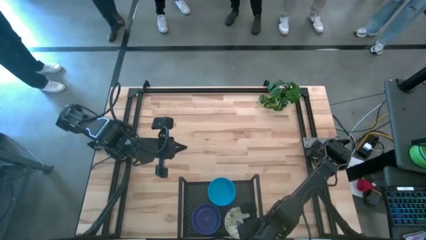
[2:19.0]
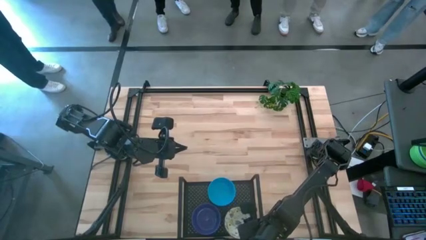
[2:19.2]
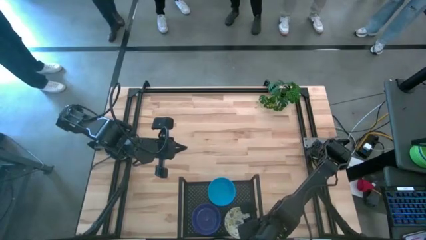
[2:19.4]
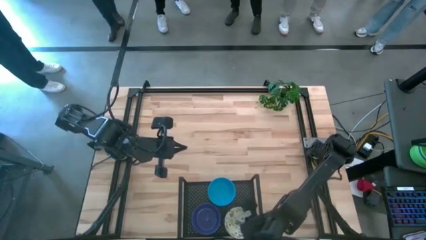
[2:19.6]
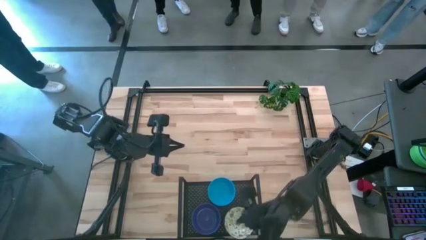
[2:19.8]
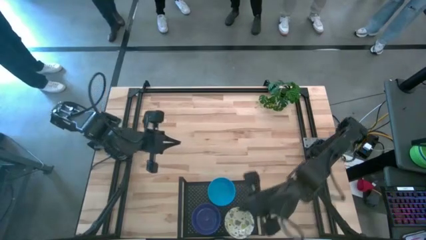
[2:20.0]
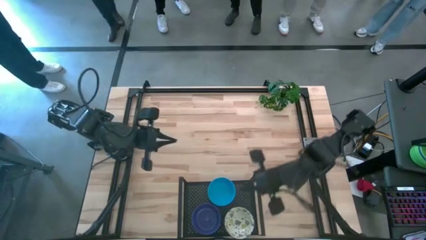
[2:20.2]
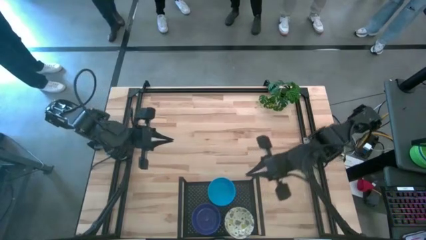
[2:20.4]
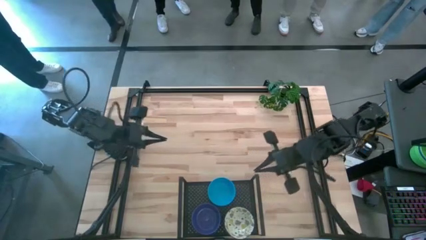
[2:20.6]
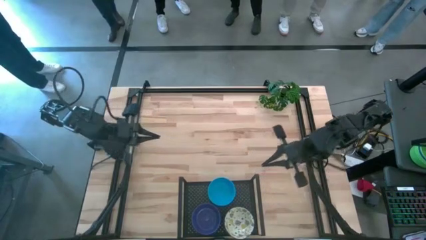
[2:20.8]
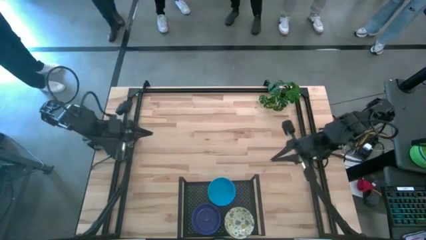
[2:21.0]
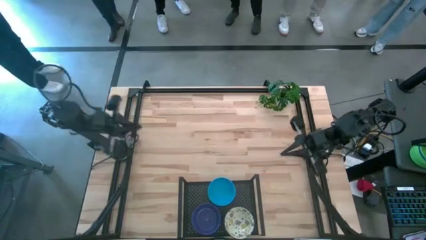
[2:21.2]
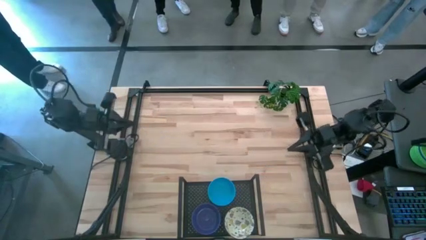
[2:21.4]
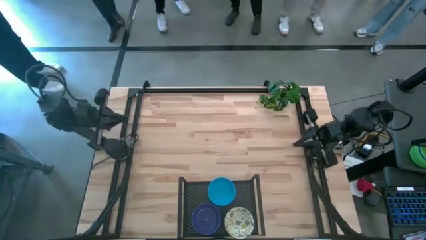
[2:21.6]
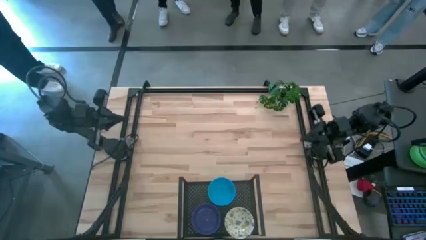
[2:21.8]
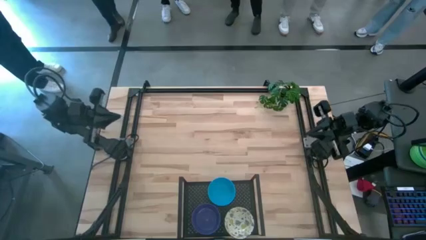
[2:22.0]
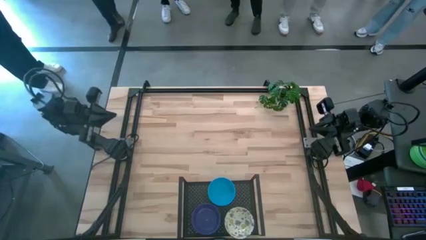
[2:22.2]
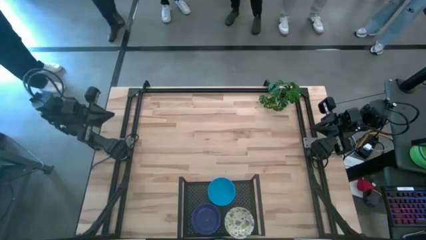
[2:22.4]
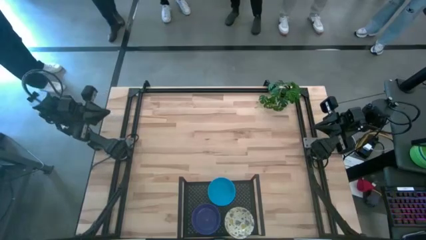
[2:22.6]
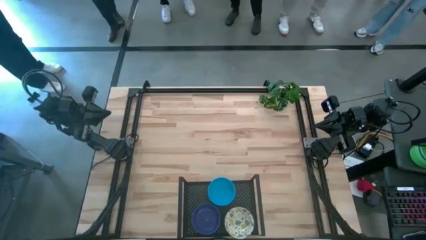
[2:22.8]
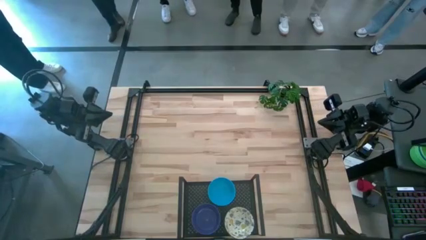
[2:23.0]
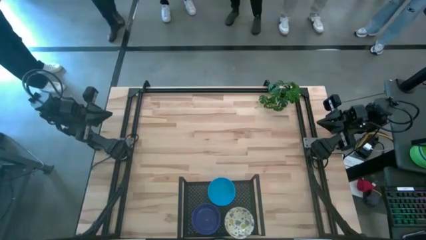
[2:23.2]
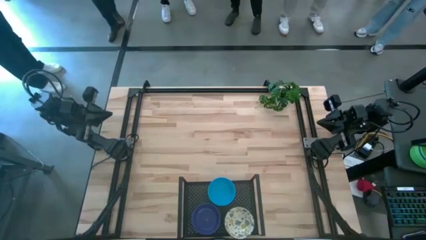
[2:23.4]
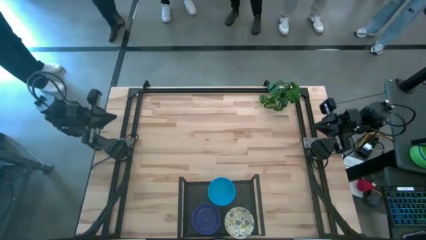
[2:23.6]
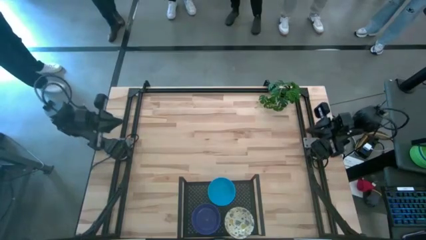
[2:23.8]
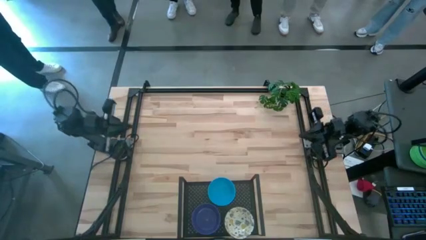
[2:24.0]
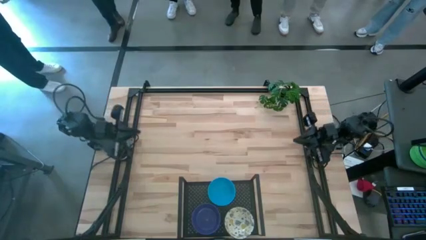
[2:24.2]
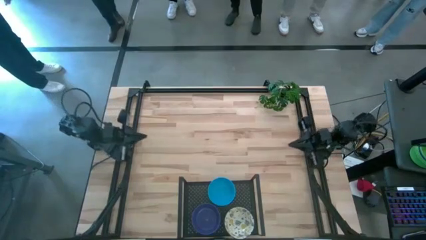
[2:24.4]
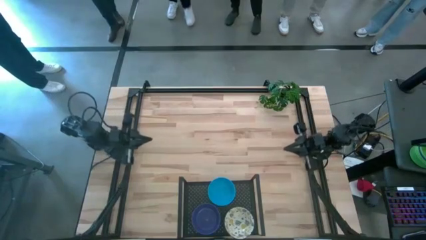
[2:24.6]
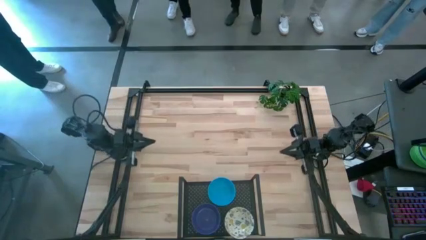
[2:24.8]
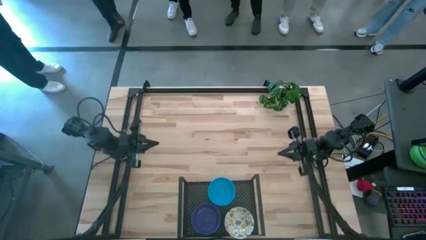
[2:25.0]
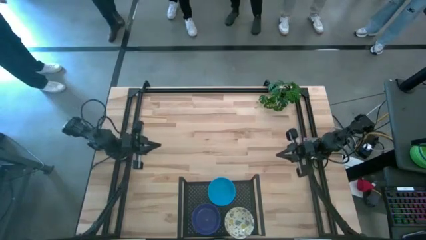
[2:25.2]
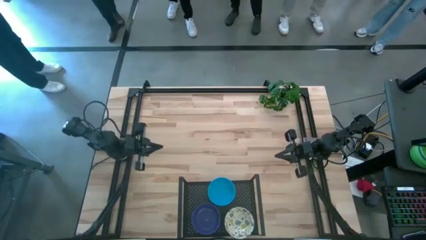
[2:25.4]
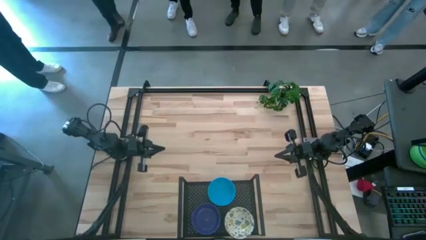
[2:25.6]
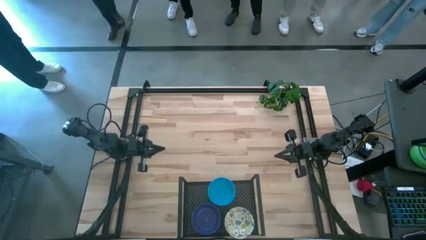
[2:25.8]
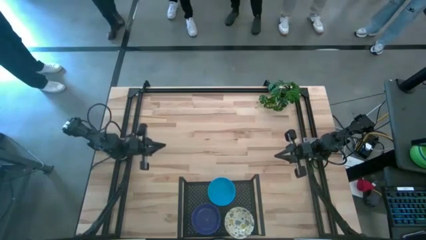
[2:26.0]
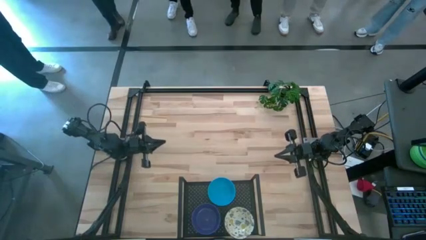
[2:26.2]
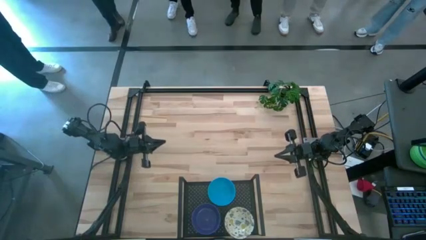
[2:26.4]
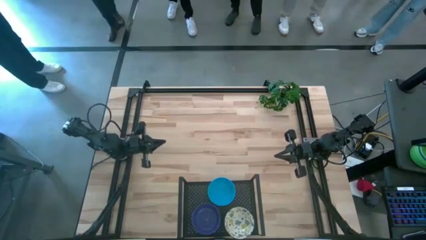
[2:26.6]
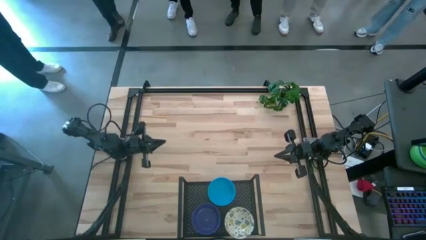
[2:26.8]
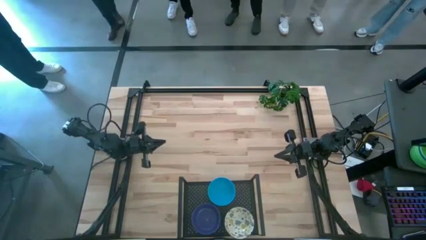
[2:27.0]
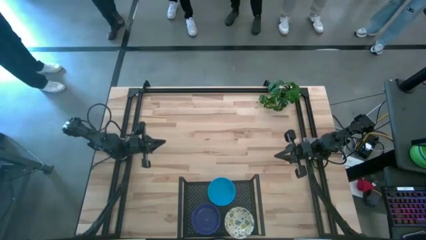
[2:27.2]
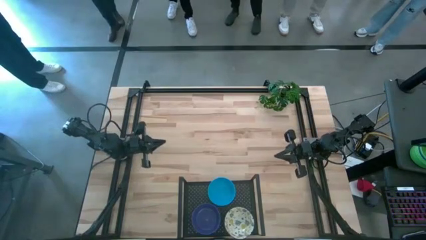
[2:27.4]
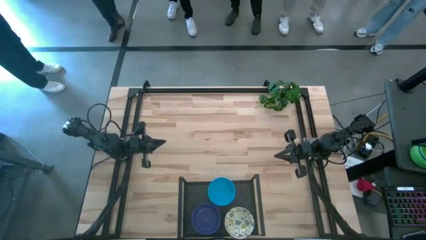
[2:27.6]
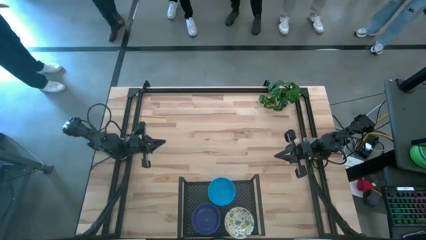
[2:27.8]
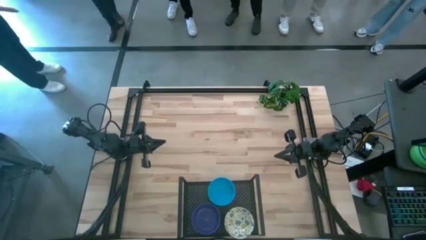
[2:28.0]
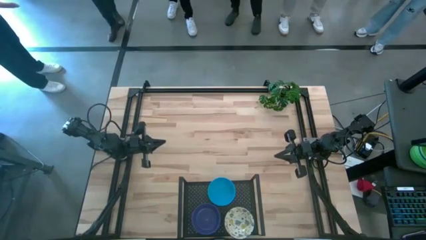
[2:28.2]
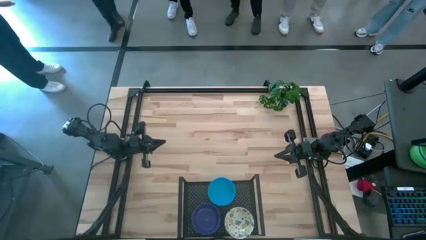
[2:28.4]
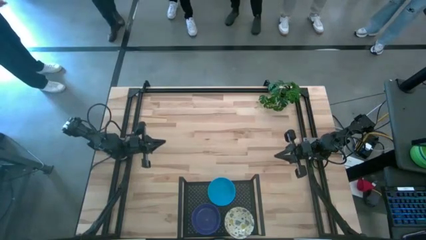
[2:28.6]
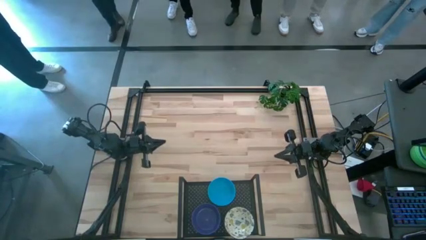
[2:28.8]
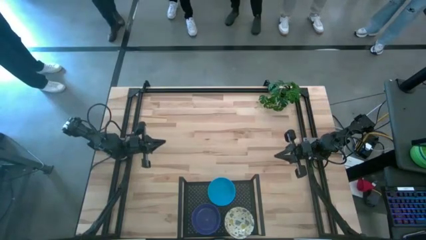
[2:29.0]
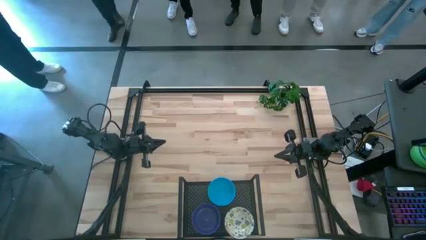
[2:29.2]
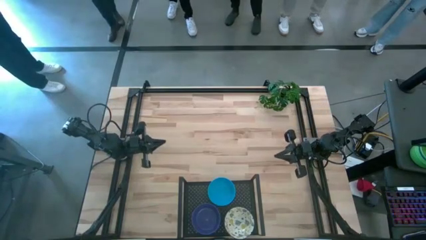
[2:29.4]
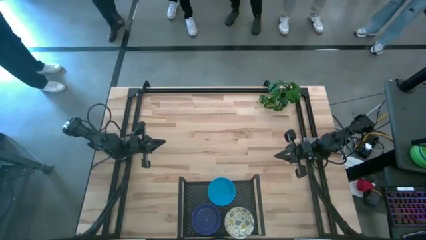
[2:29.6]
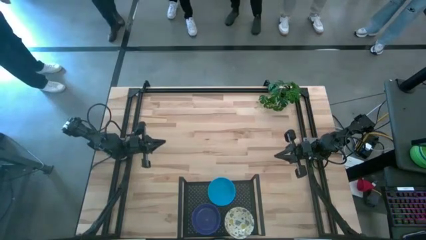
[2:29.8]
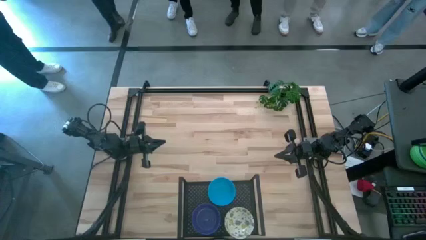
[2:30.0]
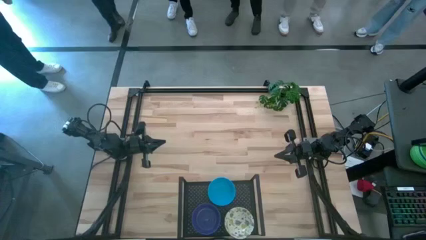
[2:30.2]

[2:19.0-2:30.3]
Task: Pick & Place Mini bowls
Return to Home Position

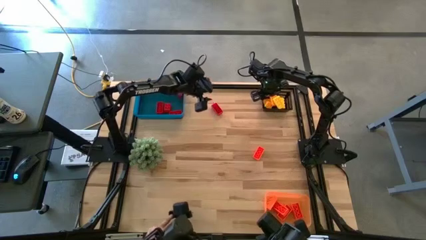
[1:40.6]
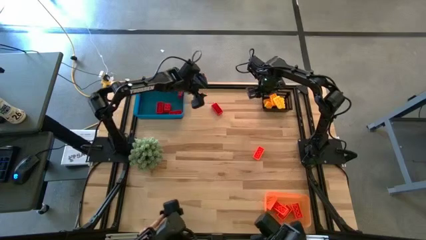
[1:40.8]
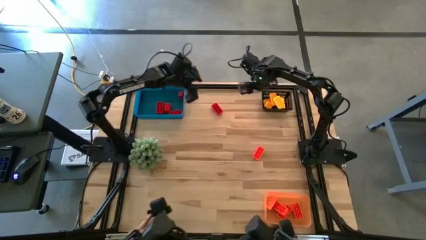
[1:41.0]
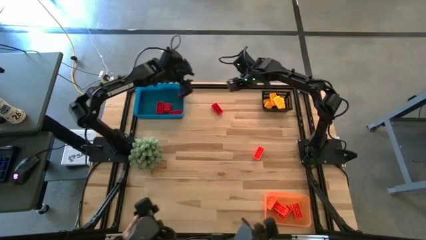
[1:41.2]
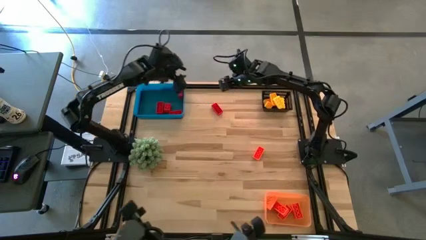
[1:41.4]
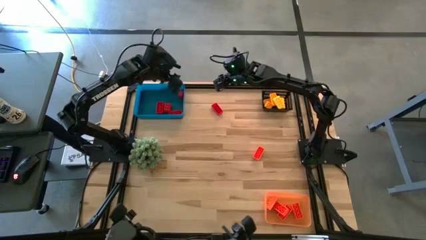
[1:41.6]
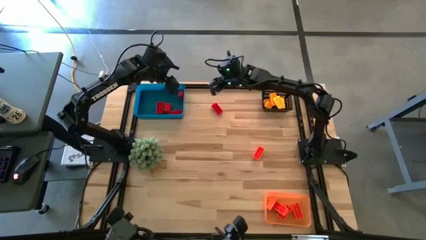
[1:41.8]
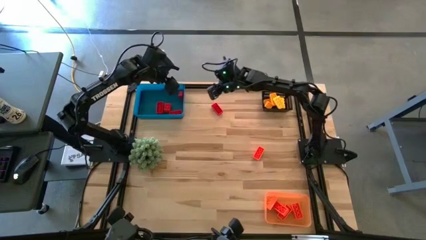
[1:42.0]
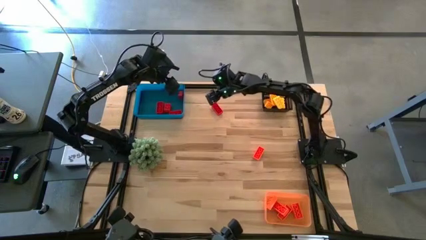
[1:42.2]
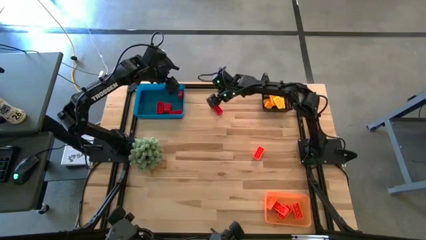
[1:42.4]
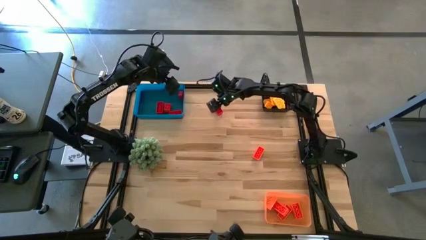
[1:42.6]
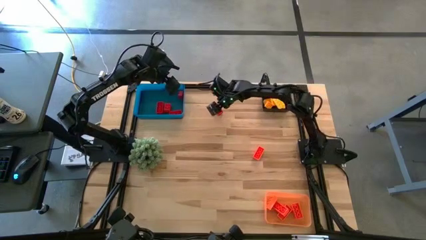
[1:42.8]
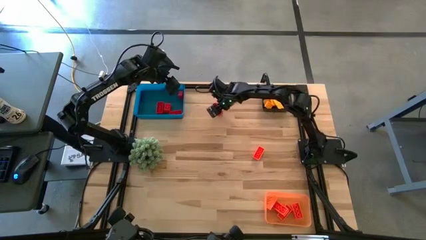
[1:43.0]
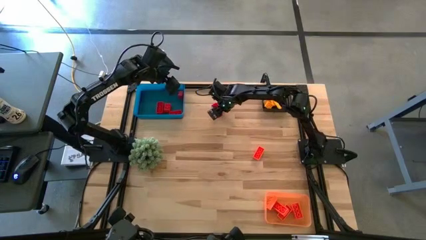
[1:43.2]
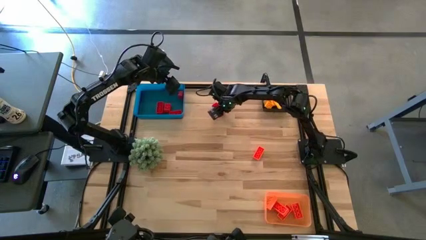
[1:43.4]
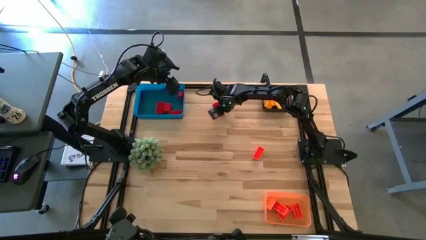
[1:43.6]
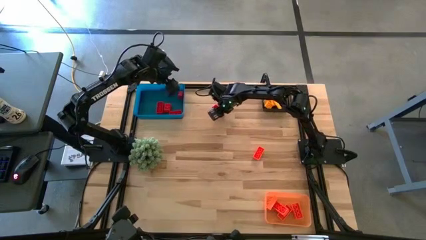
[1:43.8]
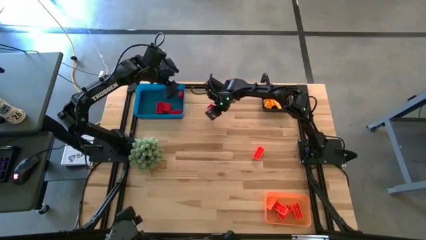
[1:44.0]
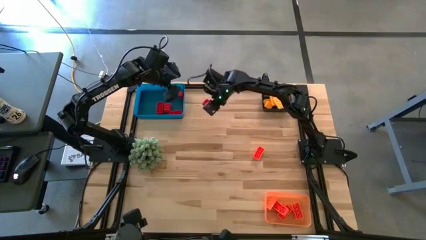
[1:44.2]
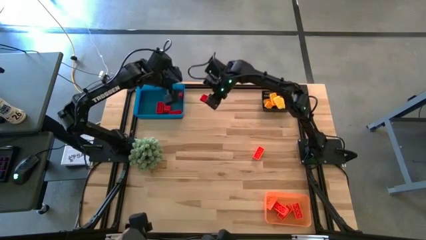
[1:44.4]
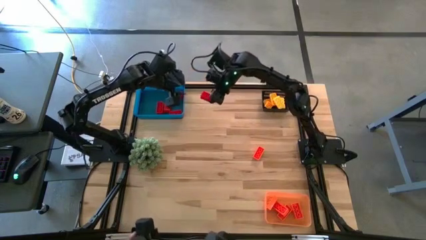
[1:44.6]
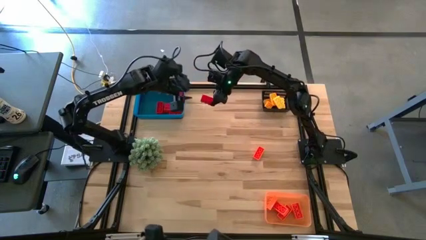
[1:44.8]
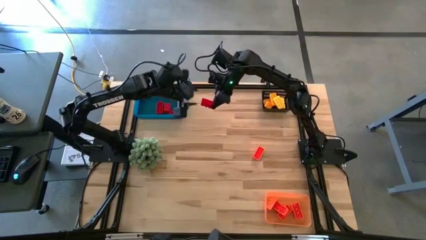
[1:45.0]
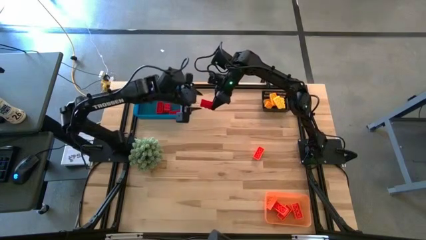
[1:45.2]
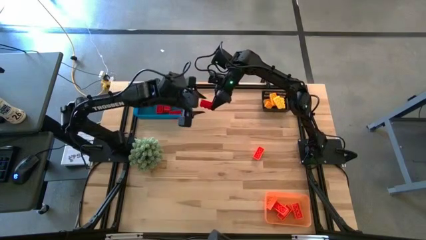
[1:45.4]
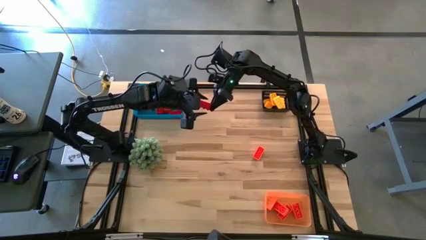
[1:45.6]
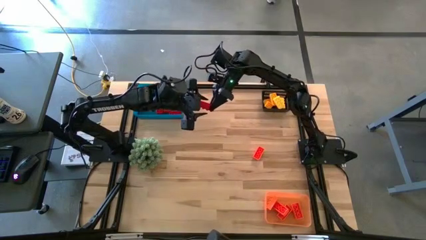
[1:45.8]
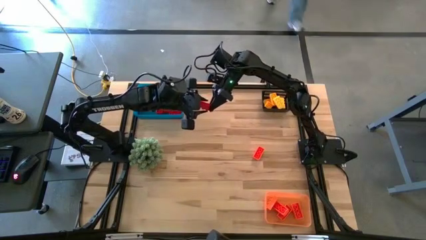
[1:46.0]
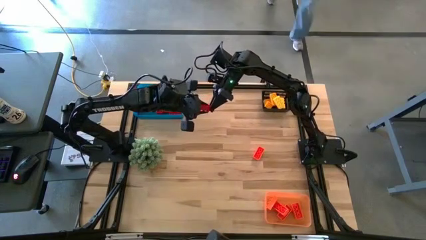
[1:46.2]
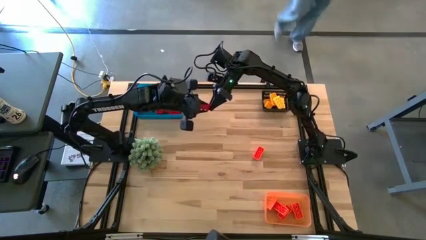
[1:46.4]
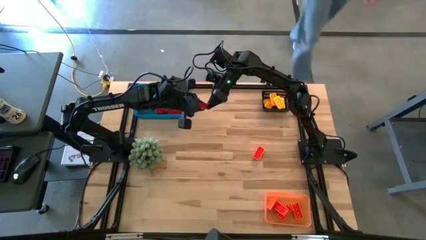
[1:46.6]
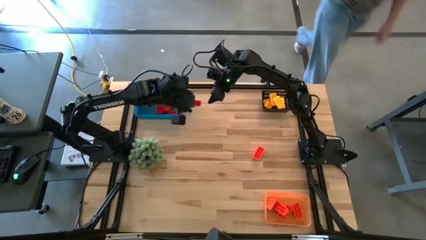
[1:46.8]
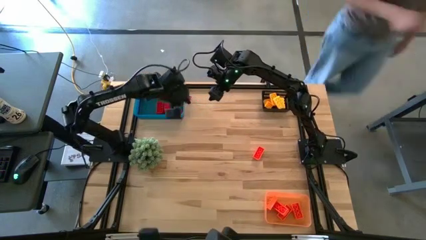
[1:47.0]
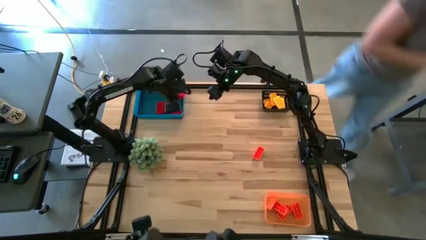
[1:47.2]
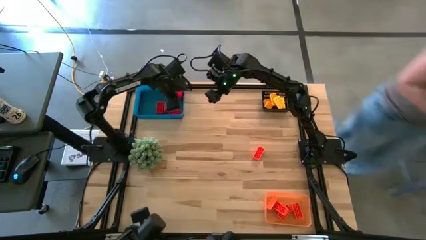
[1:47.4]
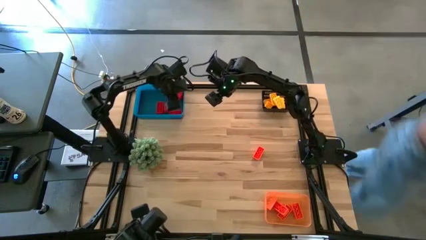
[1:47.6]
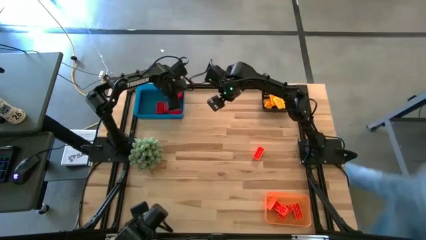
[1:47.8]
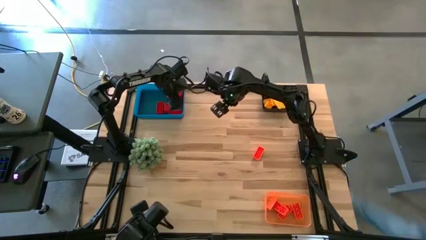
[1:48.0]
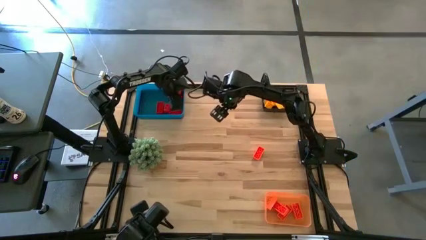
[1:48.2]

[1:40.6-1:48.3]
Task: Sort & place blocks by color
Put the red game piece into the blue bin
